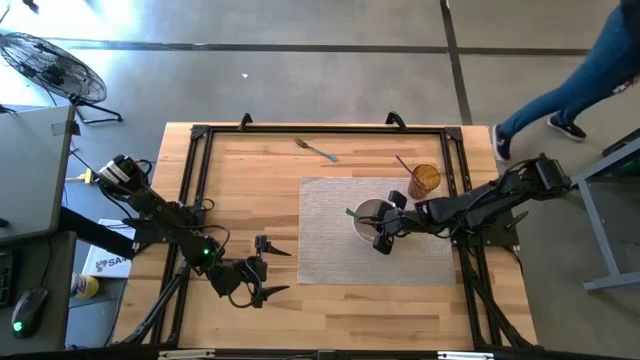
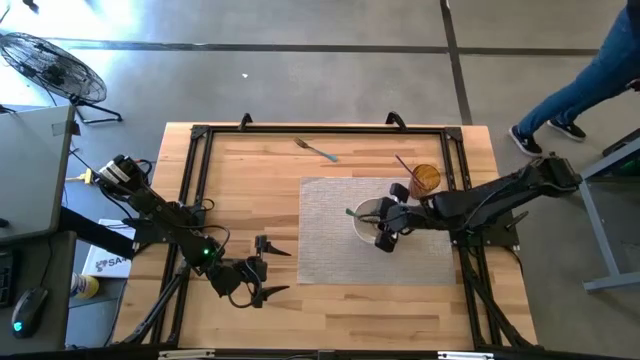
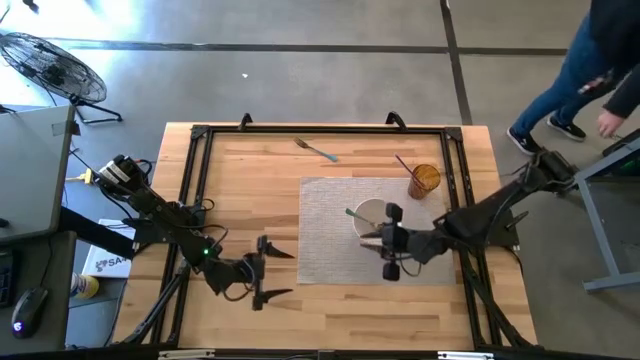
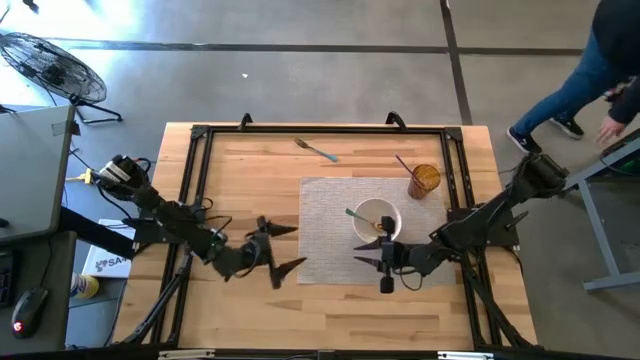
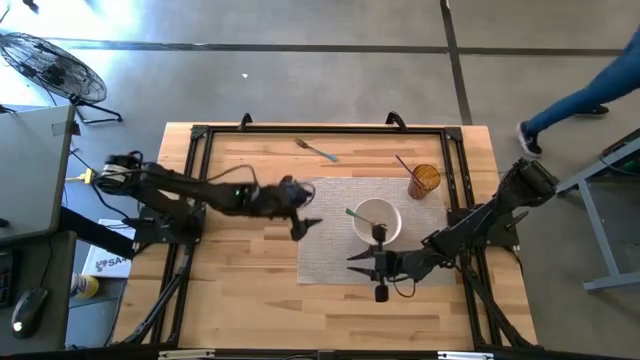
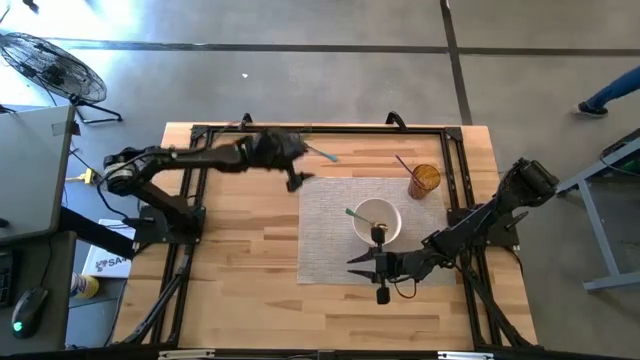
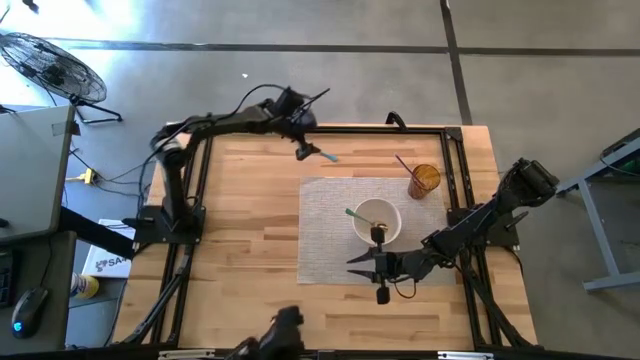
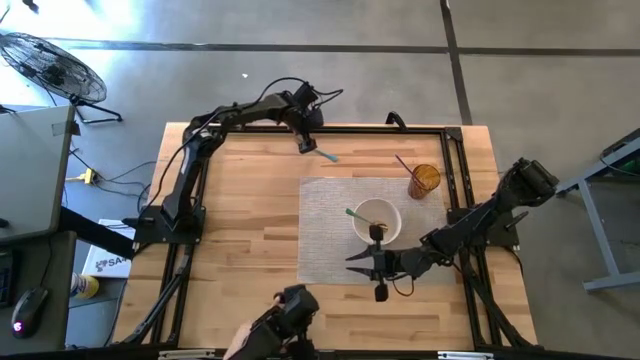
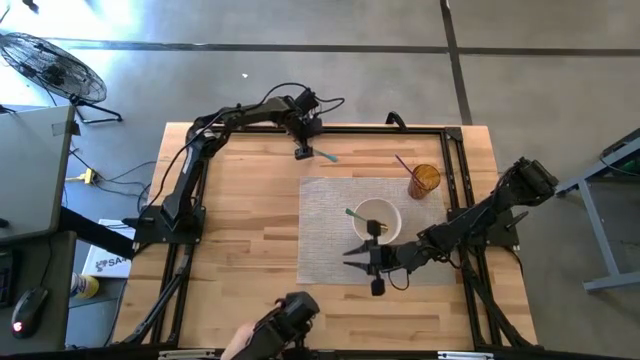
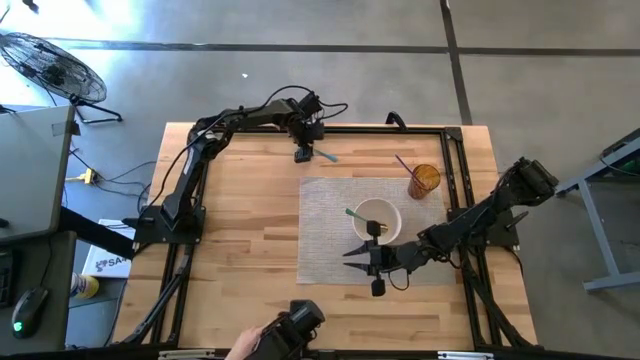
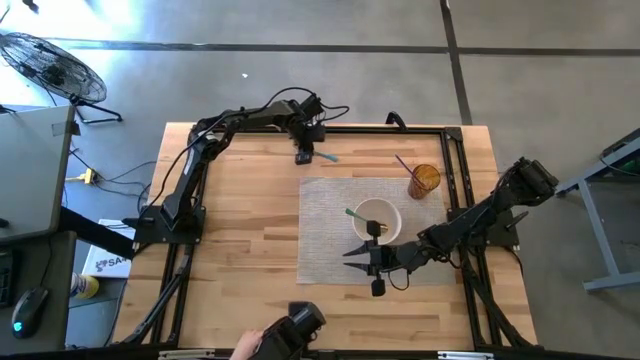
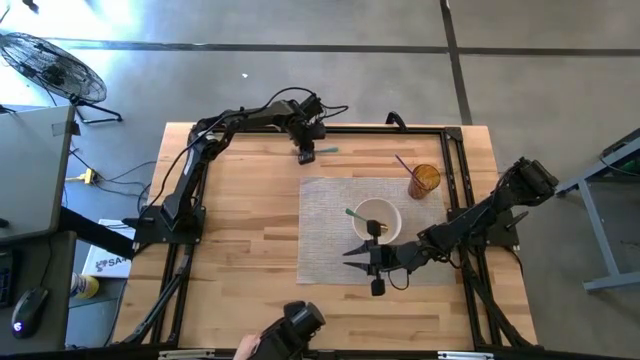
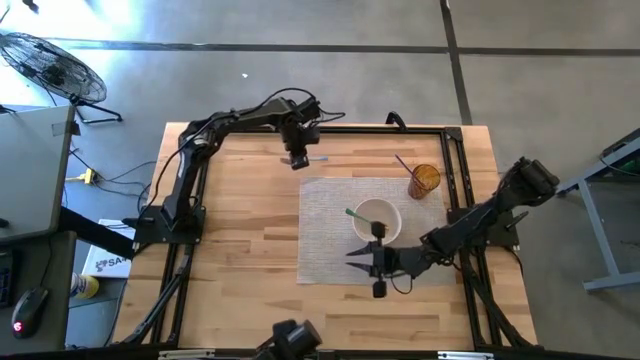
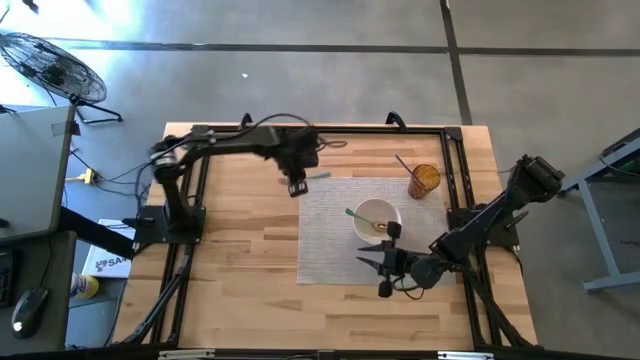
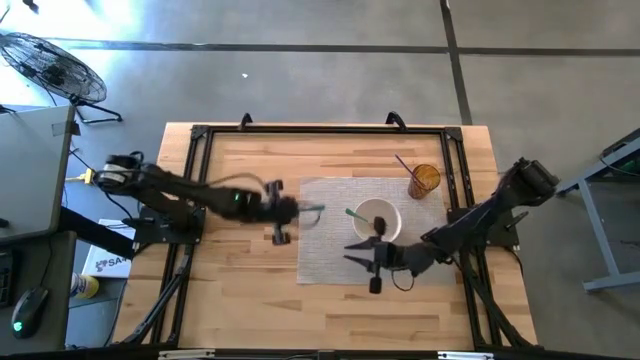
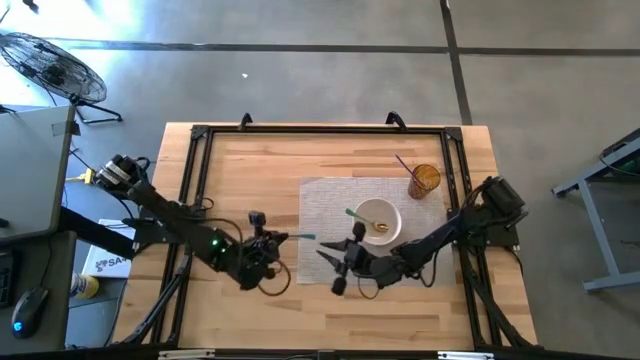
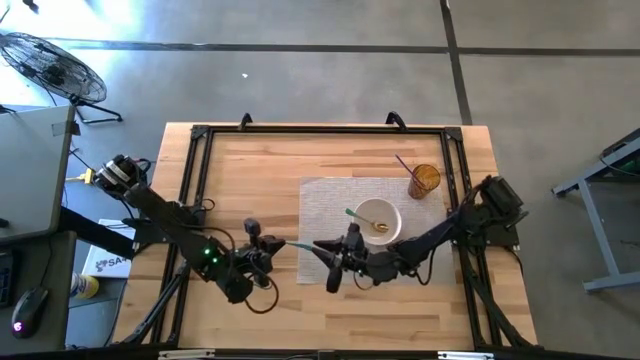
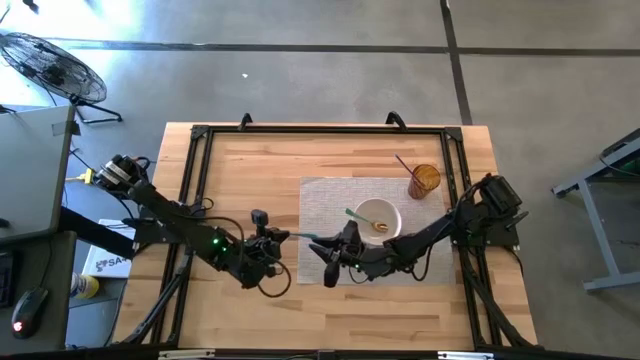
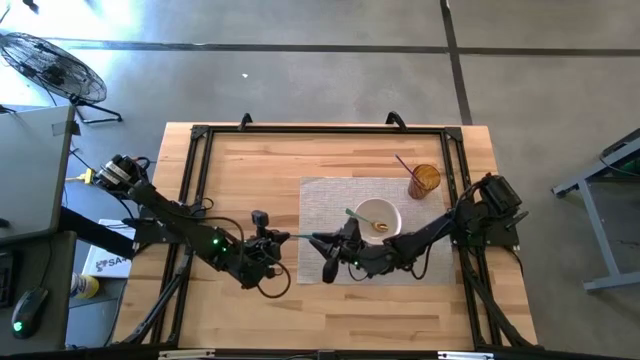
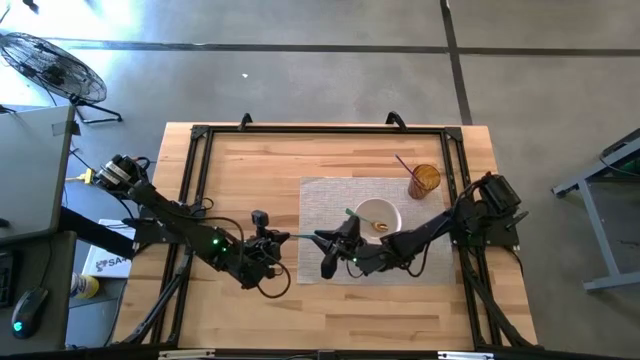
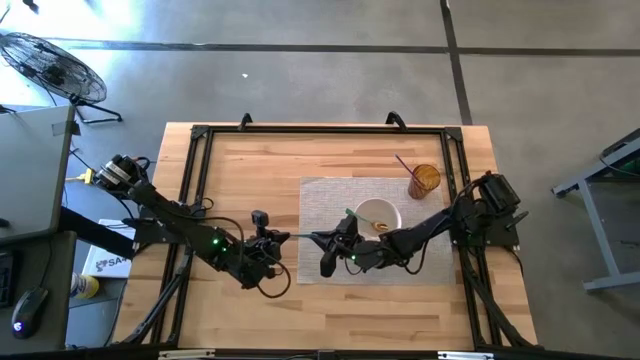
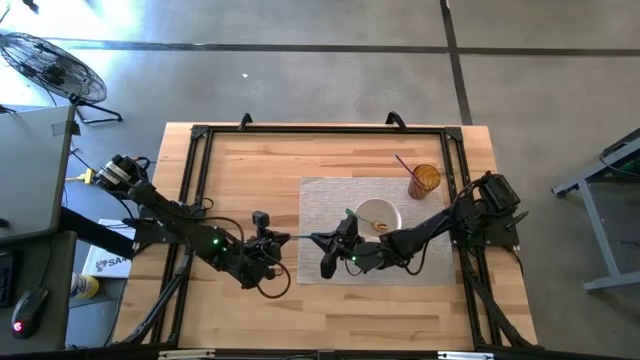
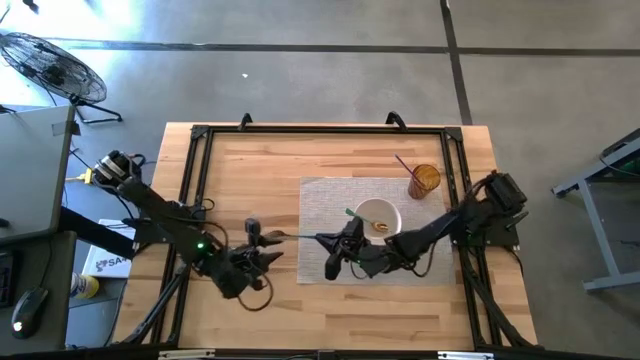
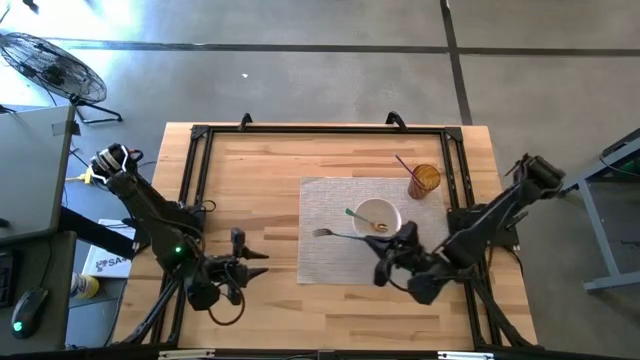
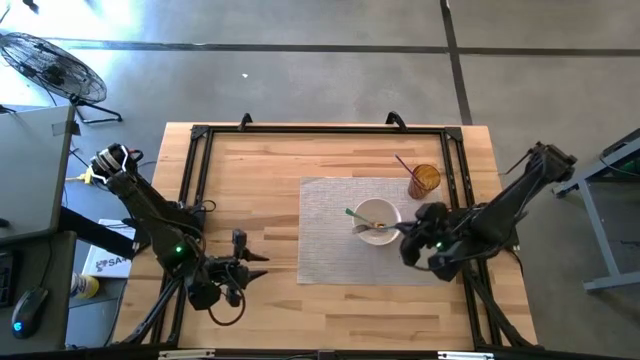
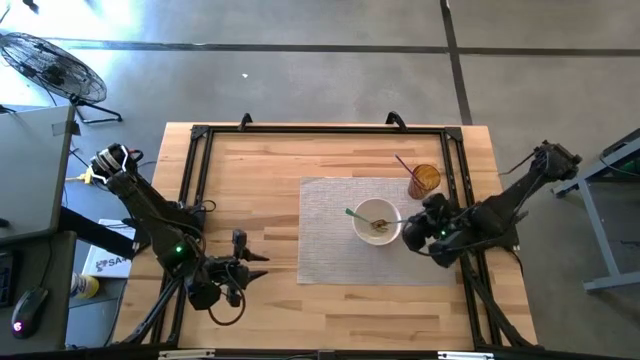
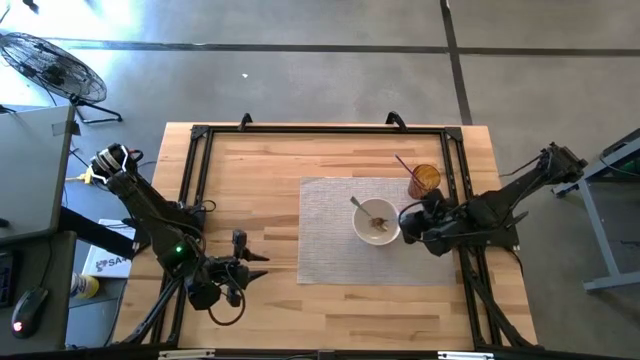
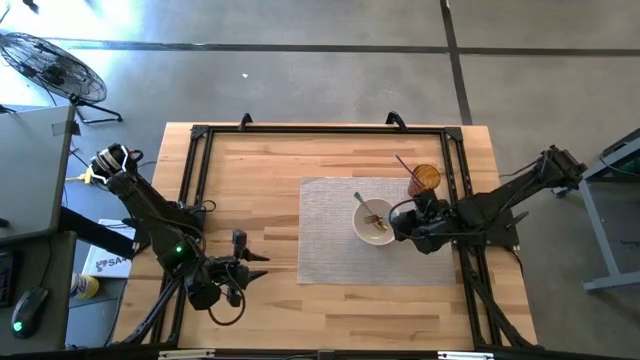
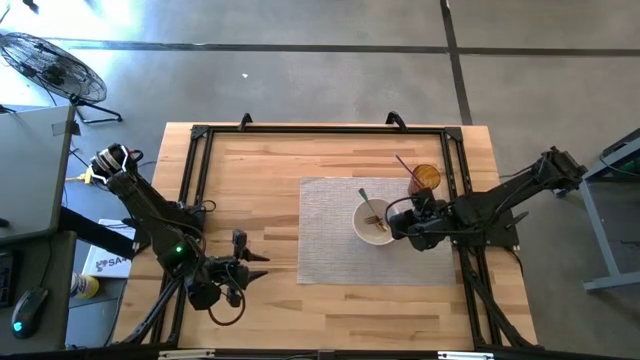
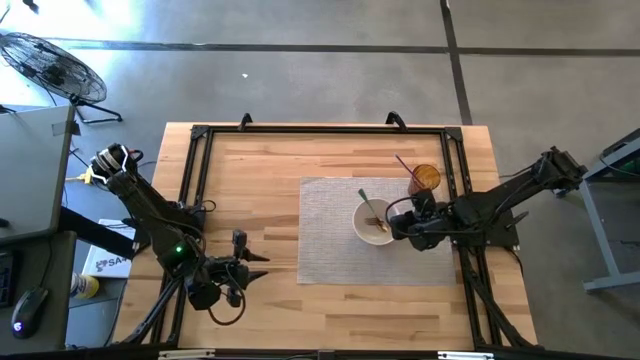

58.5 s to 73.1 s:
Task: Pick & Place Utensil
Put the blue fork into the white bowl on the gray mat

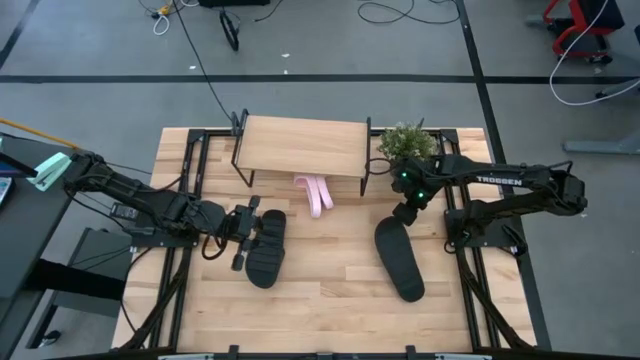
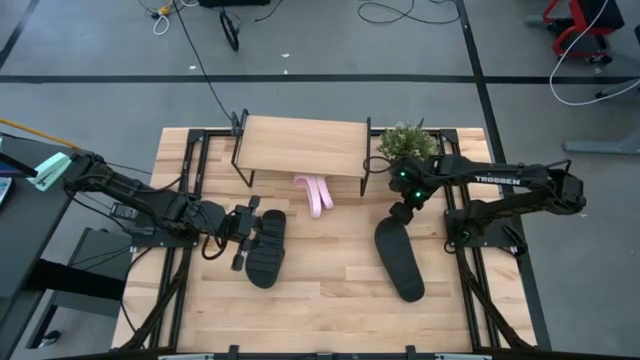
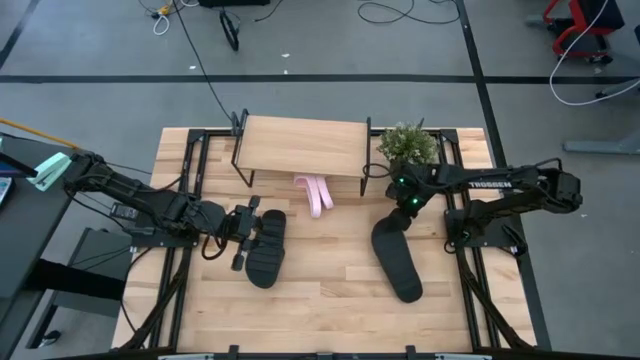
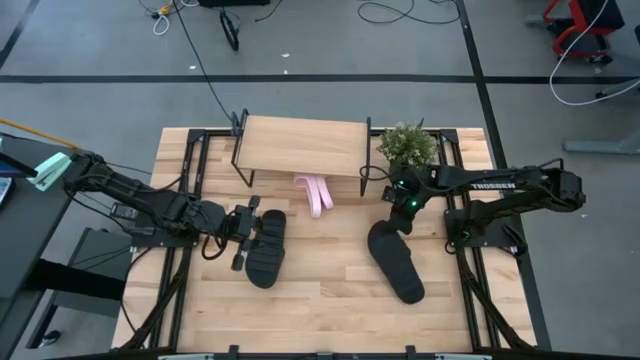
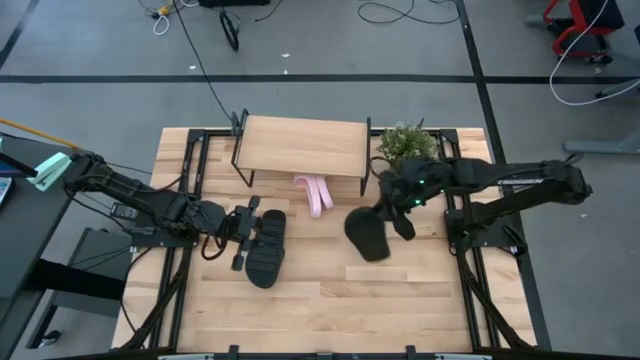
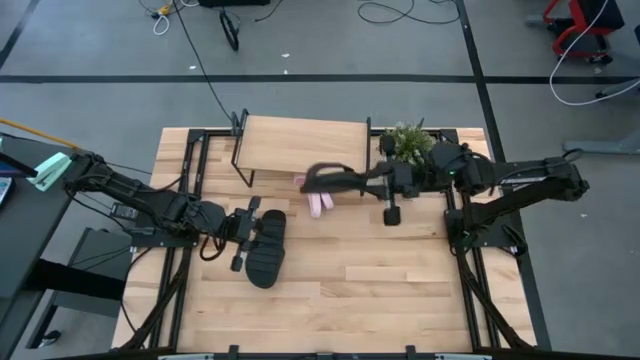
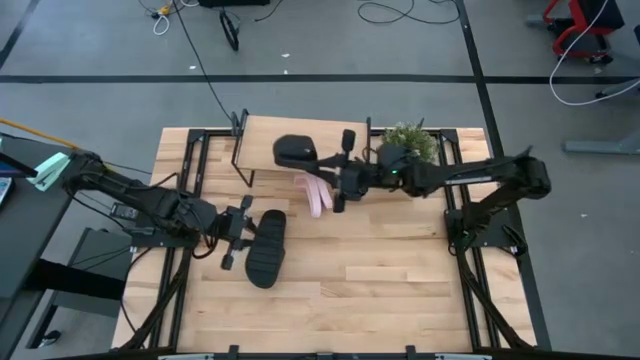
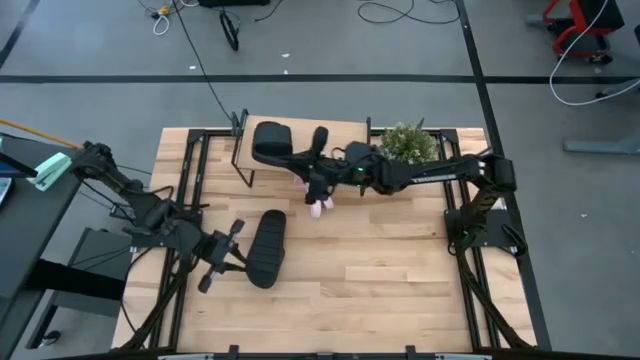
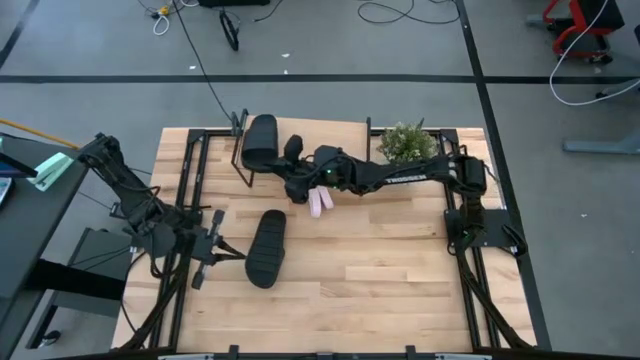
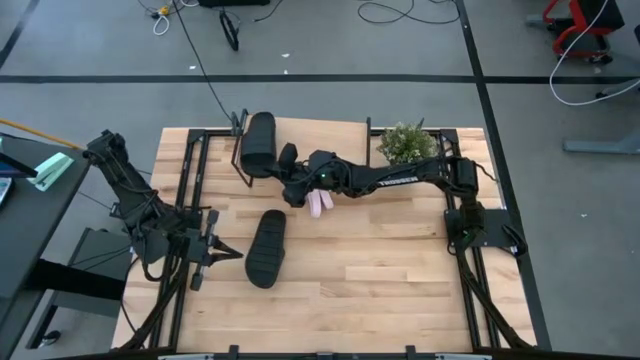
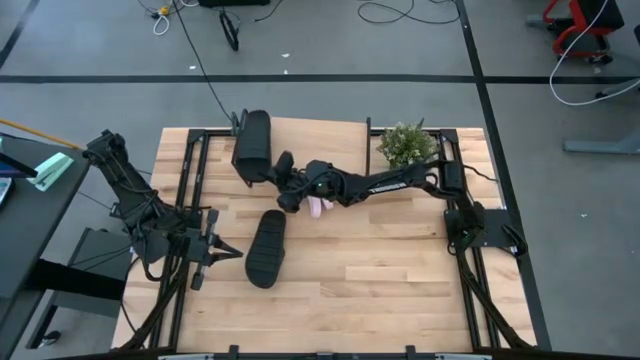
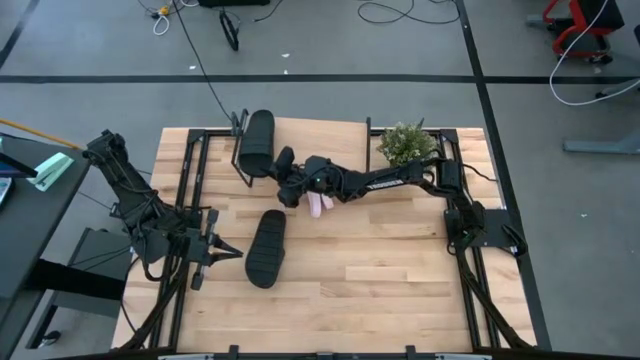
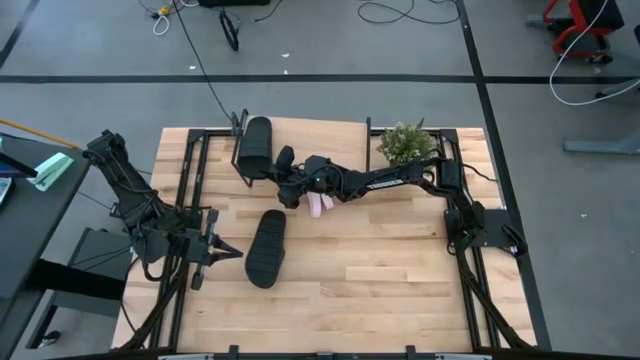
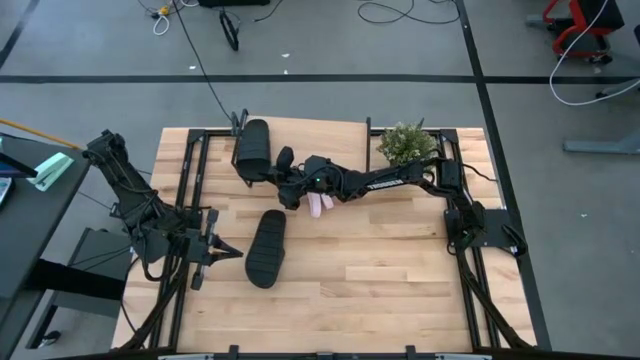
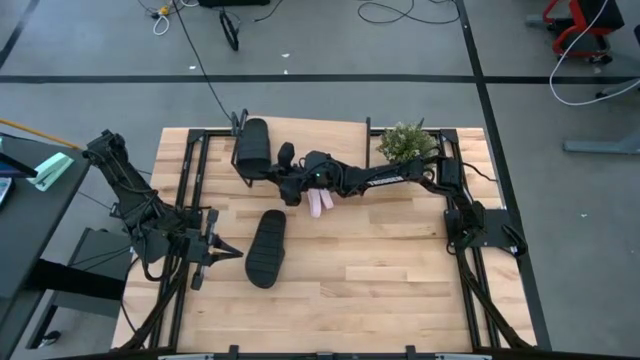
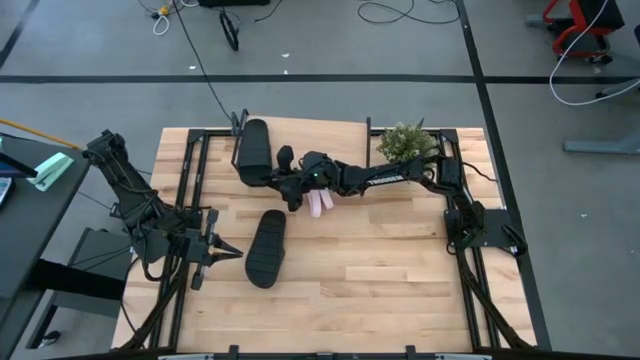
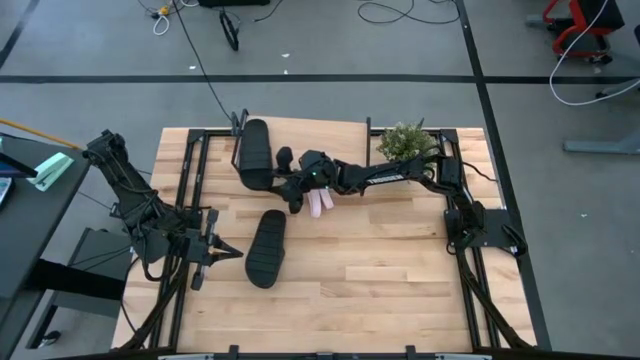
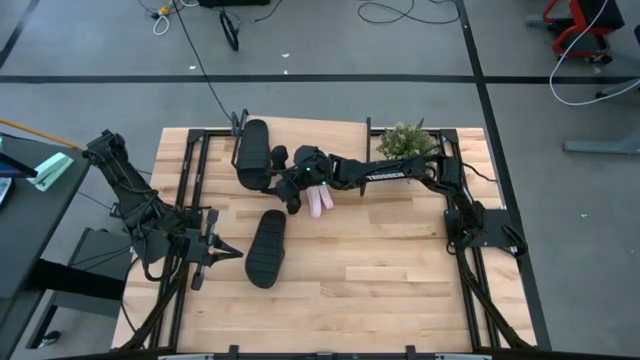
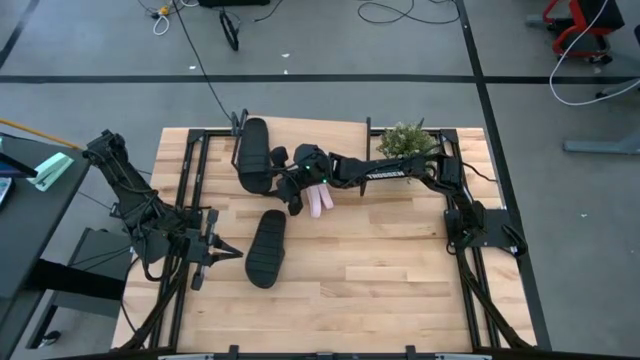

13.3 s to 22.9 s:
Task: Pick and place slides into the shelf
Put the right black slide on the shelf
